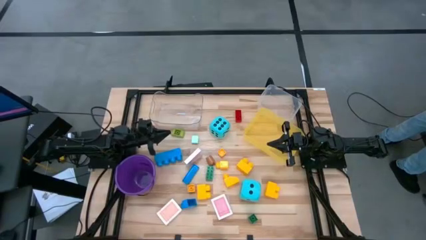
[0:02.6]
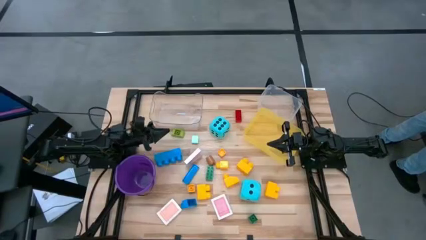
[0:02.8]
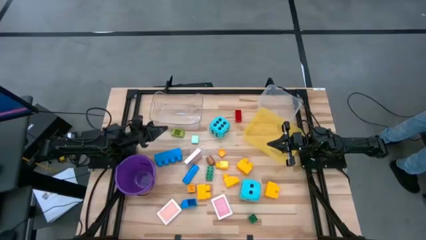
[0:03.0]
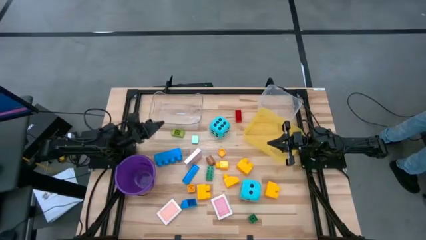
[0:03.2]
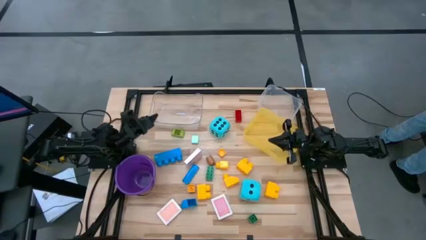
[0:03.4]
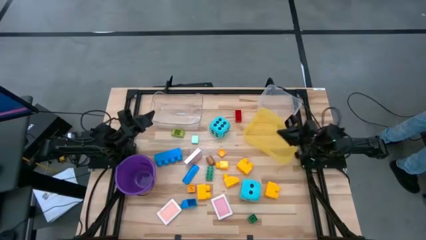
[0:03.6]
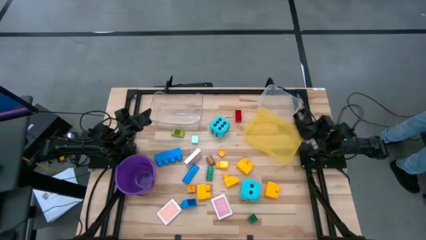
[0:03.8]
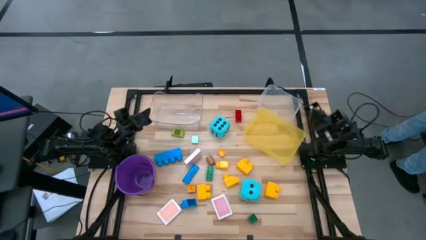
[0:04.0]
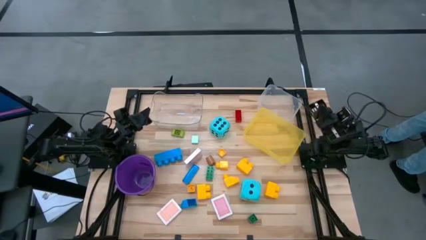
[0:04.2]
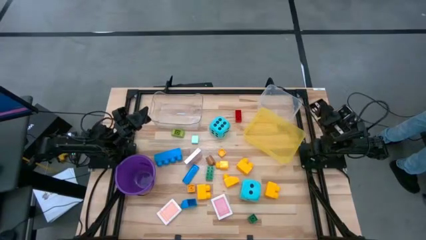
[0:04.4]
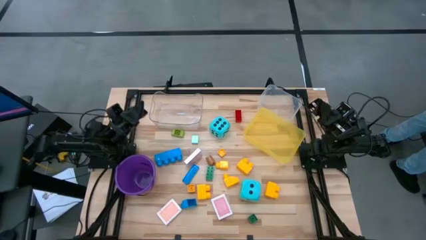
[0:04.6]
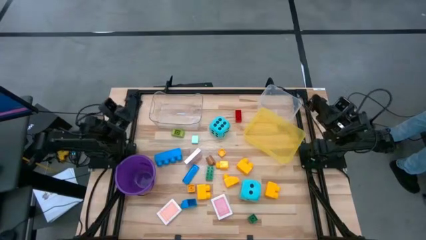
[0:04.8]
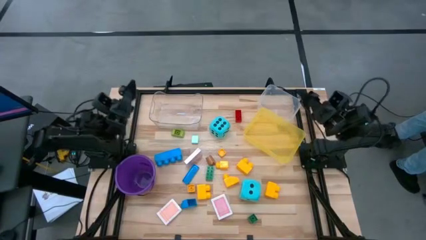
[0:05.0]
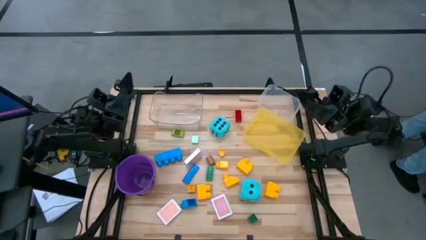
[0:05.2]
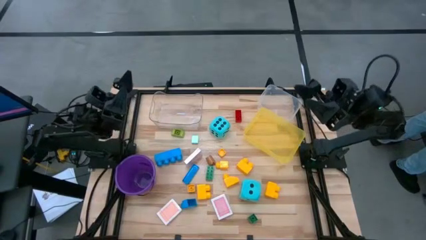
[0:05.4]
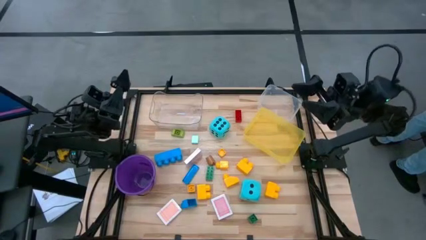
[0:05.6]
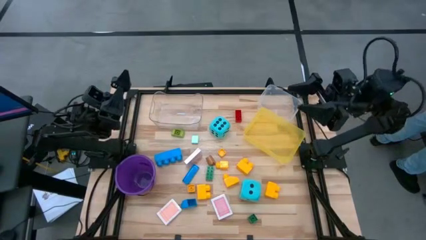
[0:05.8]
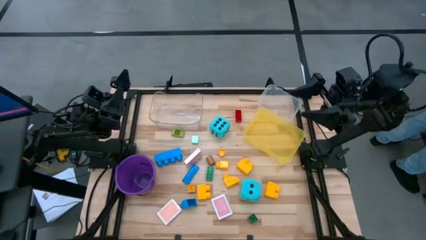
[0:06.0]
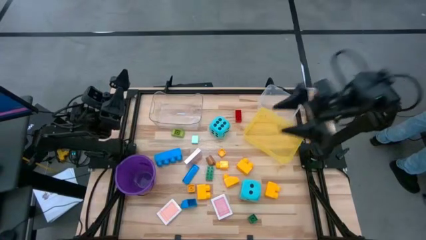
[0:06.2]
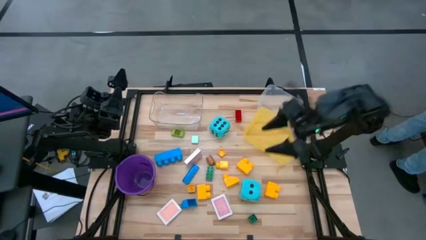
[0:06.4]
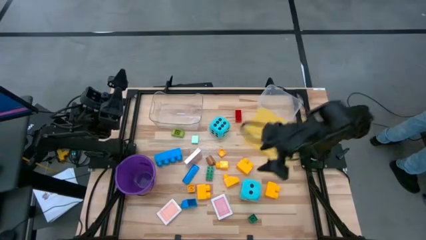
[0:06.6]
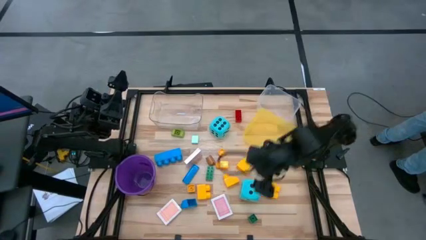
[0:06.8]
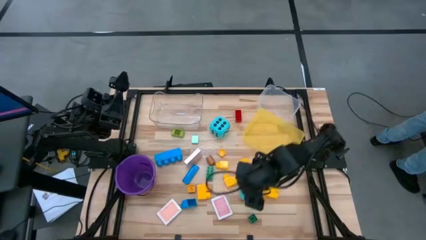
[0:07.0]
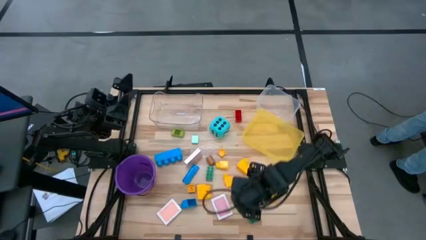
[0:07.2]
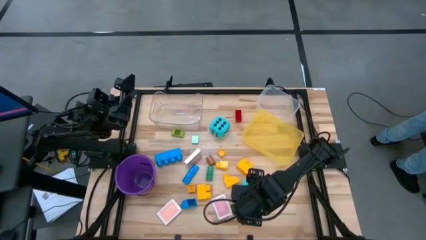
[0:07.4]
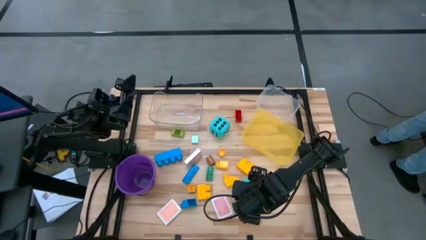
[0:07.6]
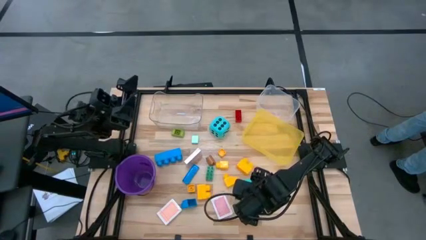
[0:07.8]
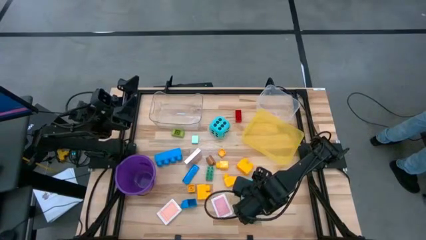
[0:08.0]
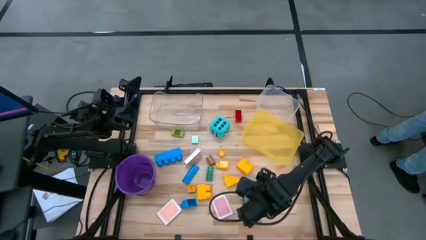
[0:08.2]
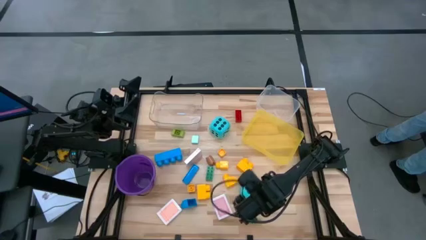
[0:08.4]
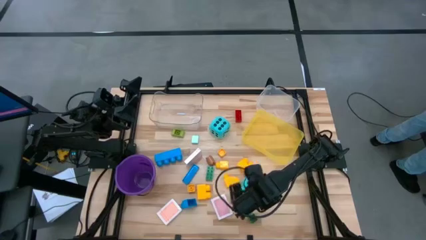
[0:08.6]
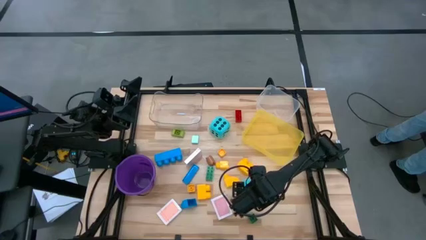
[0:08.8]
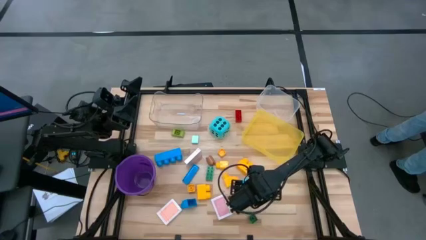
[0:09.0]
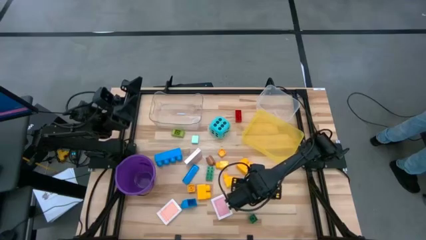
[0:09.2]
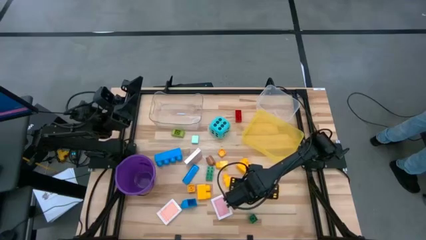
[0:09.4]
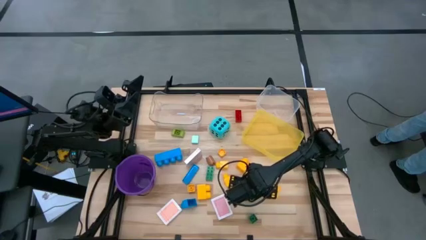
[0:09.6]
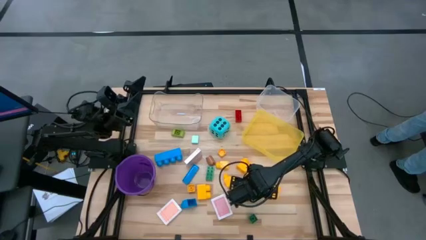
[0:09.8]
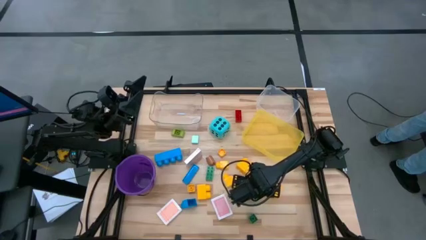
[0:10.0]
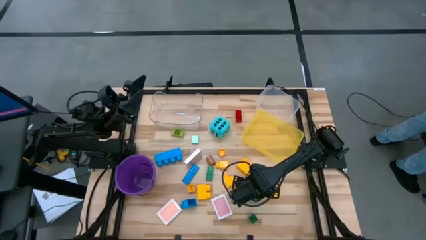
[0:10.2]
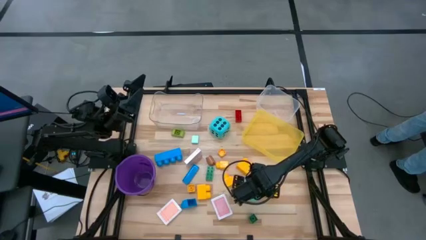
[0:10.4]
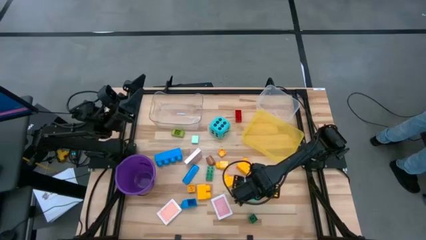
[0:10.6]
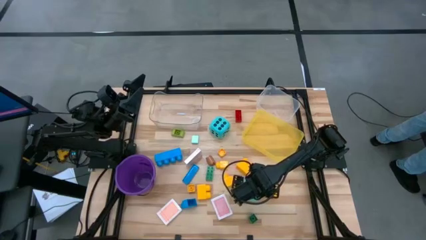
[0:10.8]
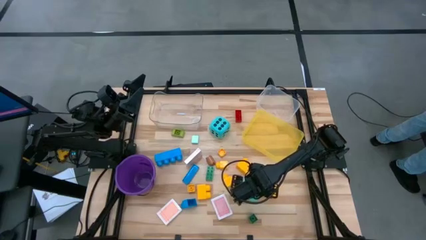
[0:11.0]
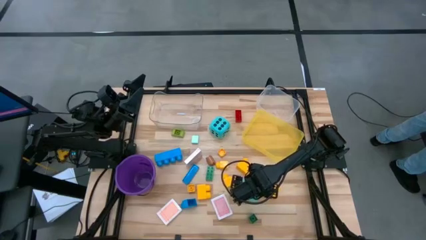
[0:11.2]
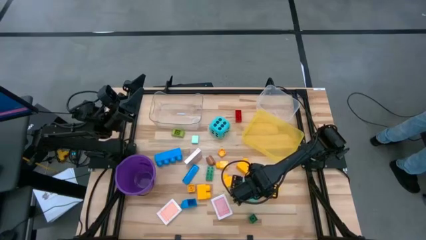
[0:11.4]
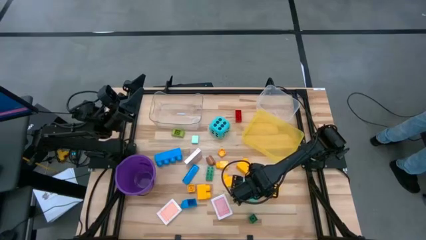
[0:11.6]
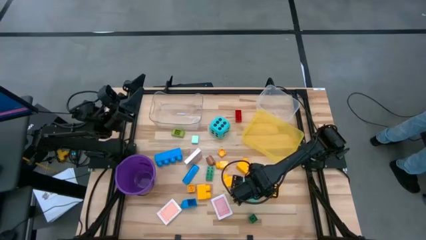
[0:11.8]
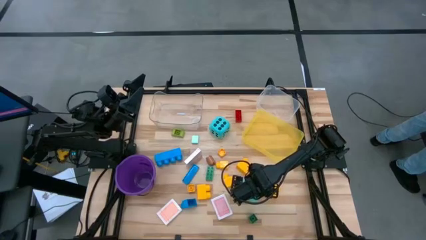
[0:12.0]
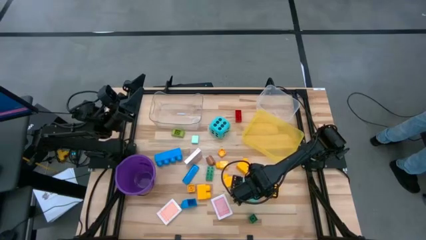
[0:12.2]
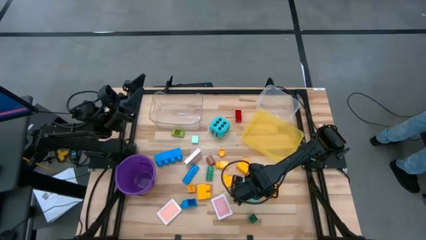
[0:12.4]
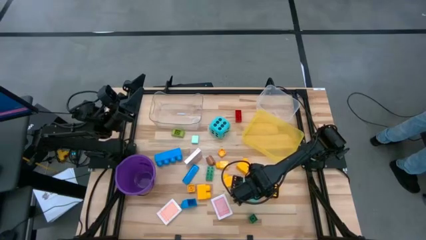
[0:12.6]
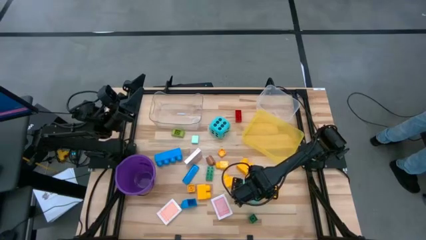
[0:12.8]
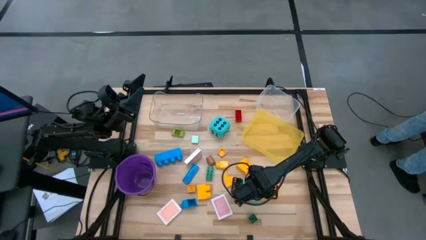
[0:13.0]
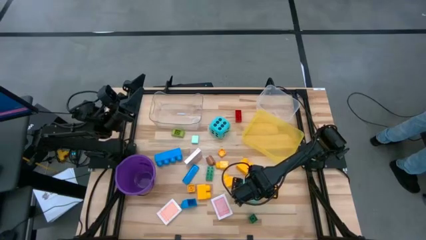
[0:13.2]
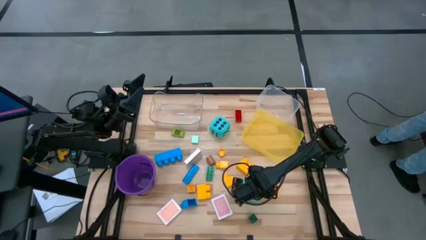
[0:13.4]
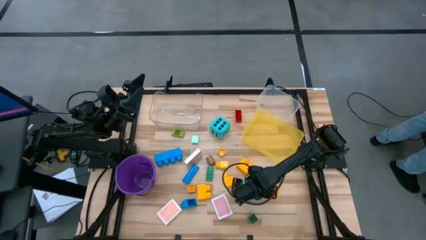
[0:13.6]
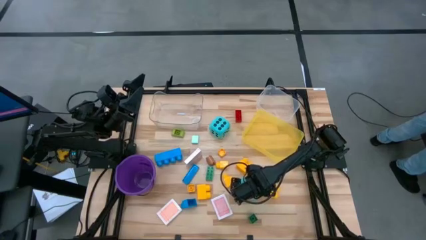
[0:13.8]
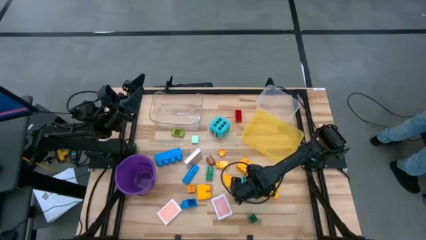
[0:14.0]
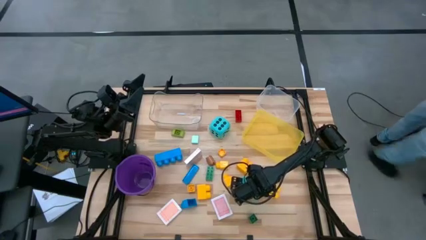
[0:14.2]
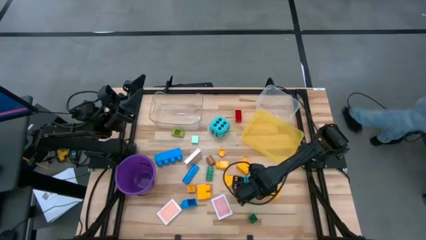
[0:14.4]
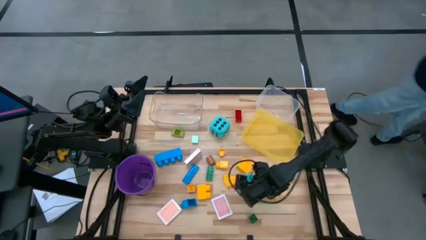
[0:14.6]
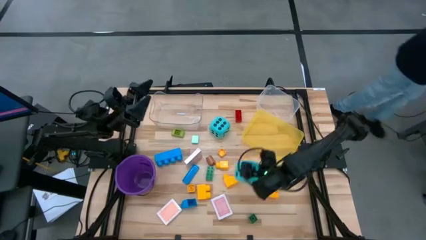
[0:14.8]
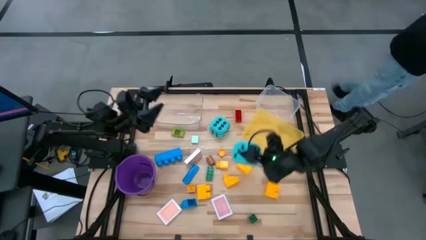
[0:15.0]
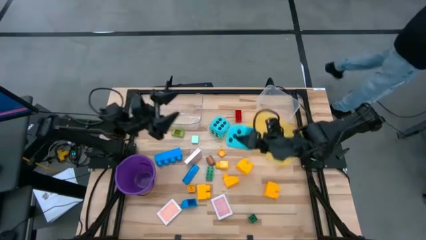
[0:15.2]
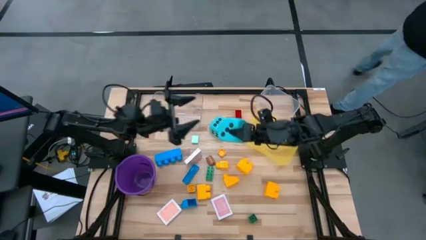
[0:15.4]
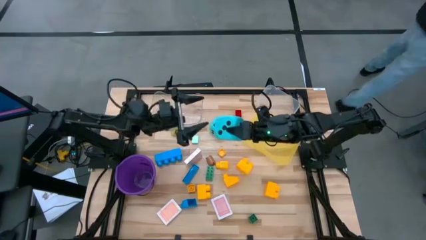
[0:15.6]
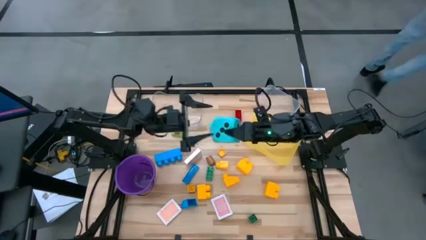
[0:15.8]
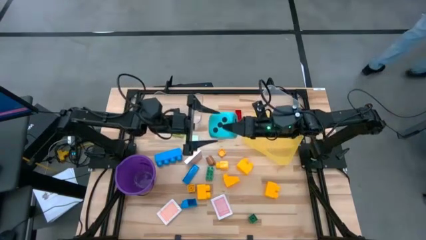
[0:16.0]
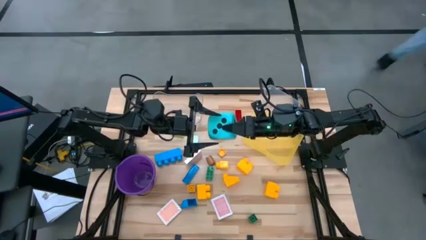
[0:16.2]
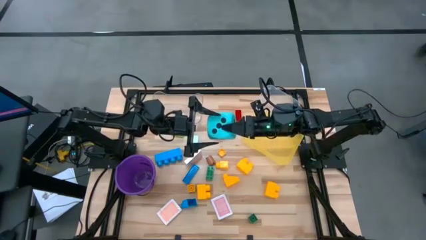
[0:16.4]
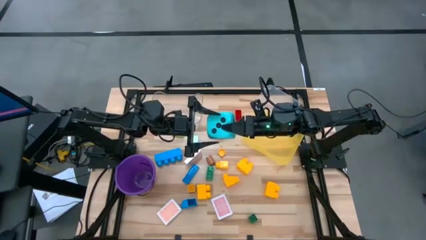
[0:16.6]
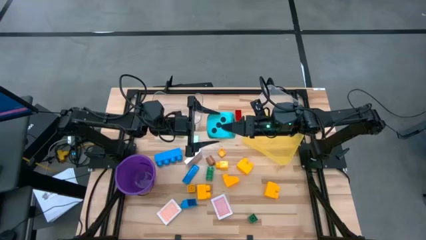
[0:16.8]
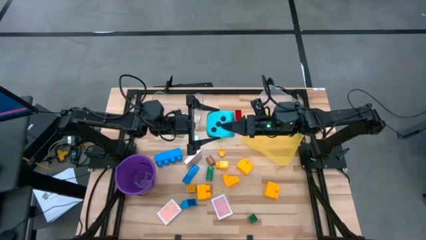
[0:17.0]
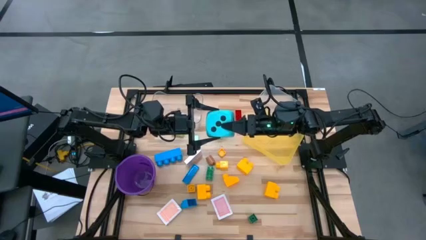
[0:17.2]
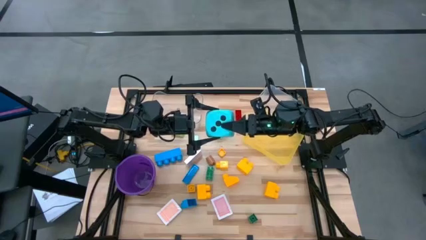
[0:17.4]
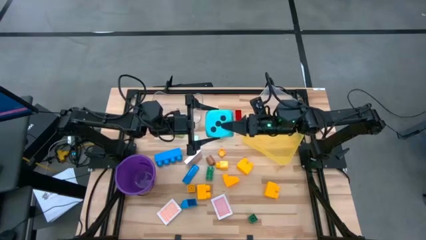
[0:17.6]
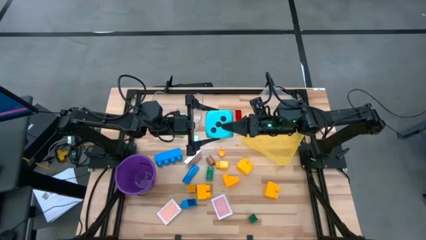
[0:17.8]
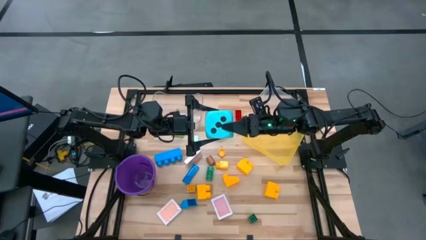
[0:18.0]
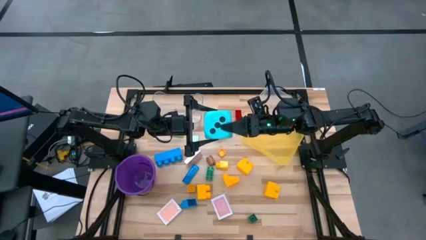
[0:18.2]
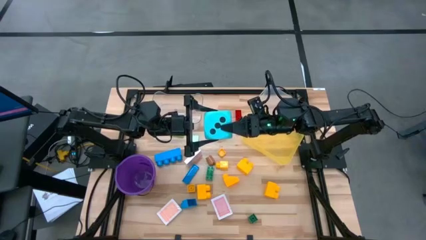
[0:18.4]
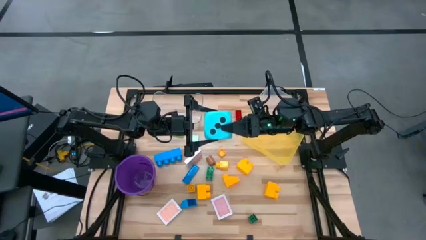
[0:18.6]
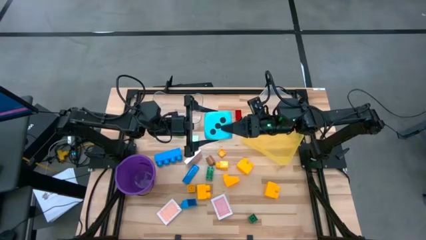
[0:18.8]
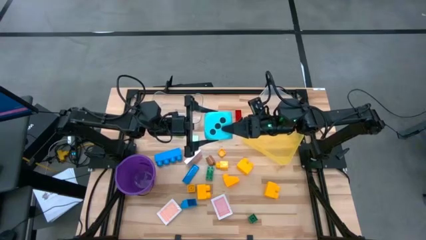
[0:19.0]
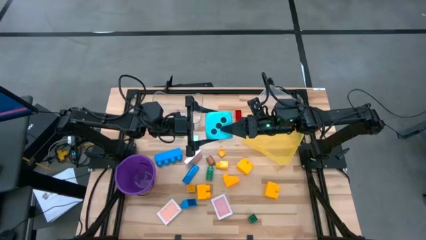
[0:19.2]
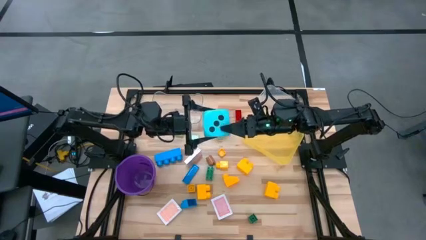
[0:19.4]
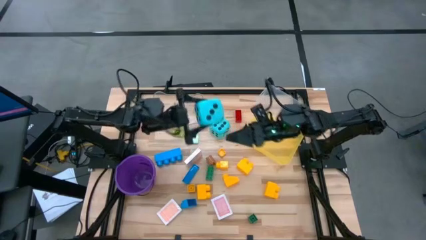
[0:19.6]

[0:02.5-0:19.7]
Task: Pick & Place Toys
Put the blue dice into the transparent bin
